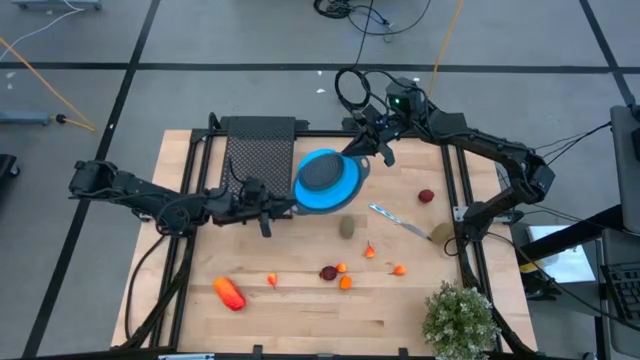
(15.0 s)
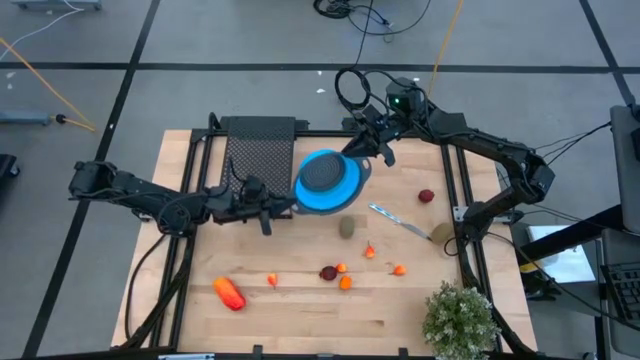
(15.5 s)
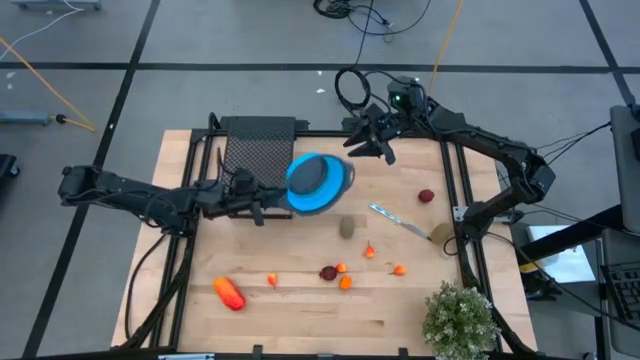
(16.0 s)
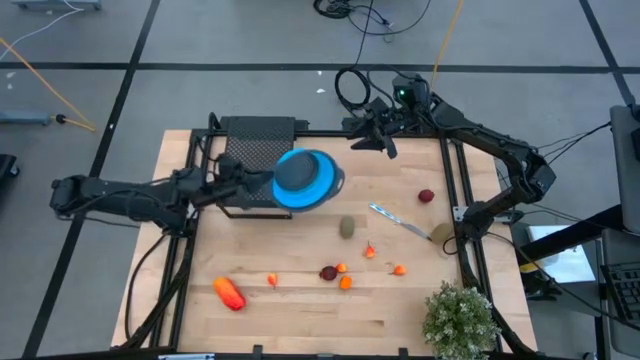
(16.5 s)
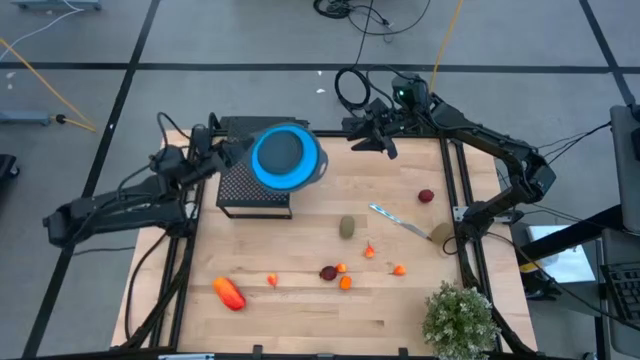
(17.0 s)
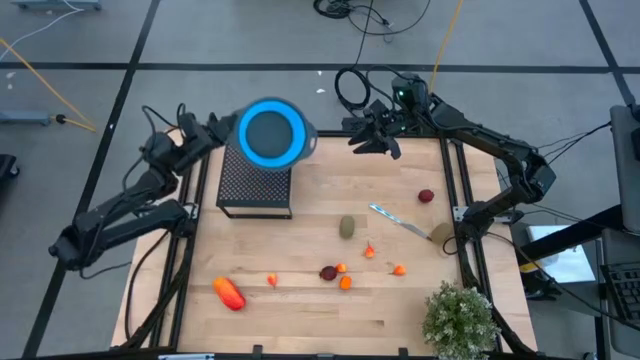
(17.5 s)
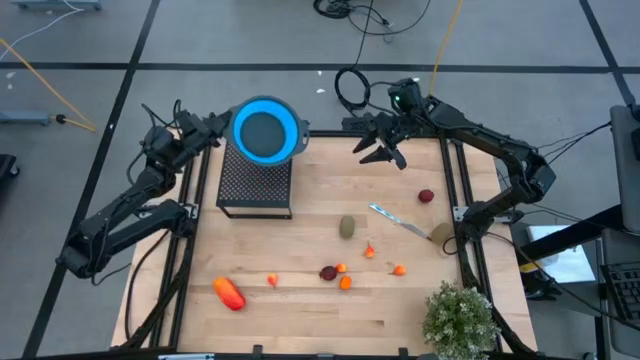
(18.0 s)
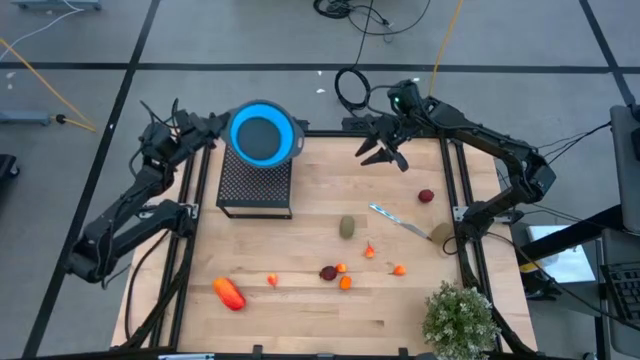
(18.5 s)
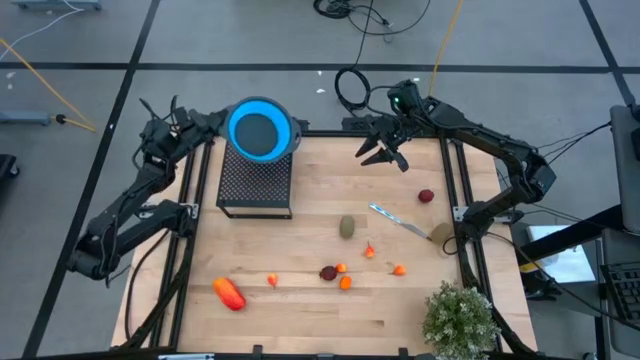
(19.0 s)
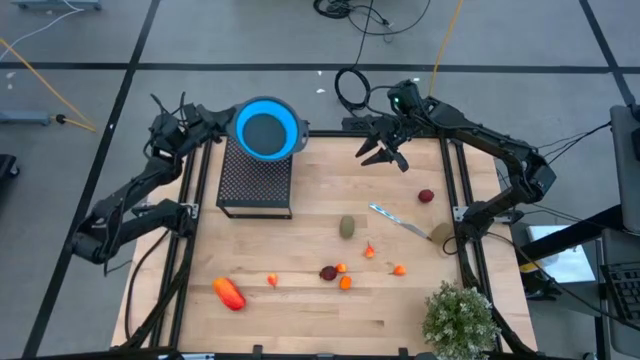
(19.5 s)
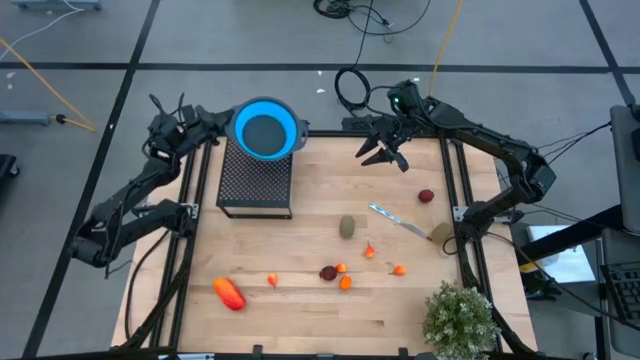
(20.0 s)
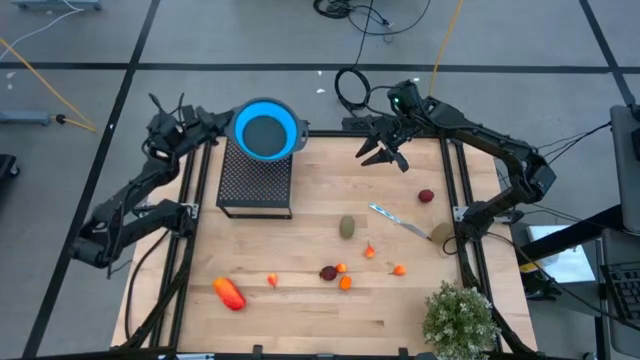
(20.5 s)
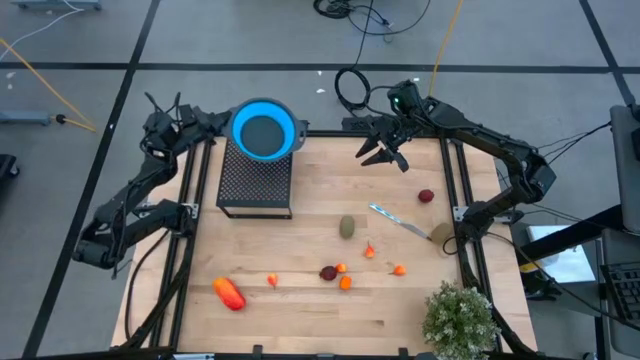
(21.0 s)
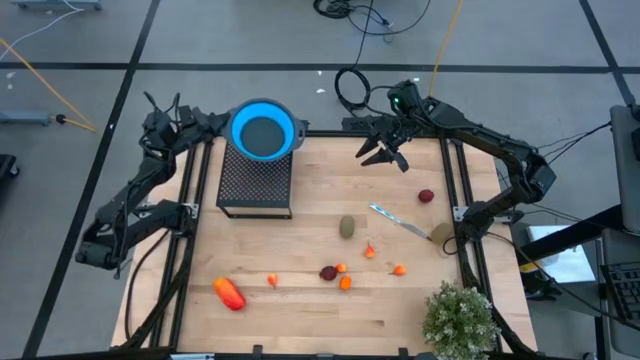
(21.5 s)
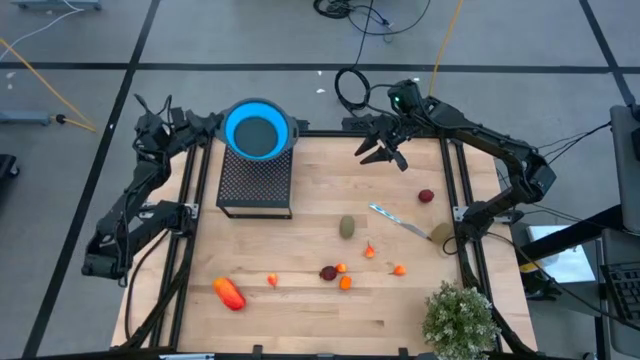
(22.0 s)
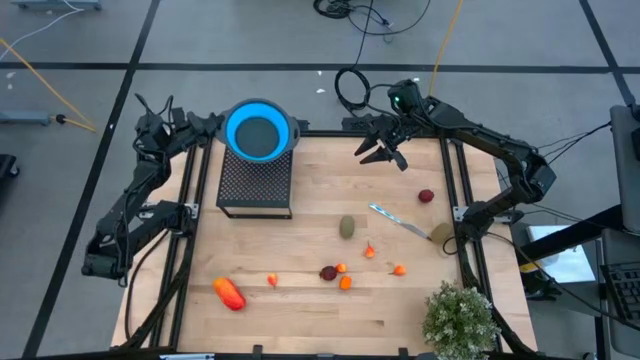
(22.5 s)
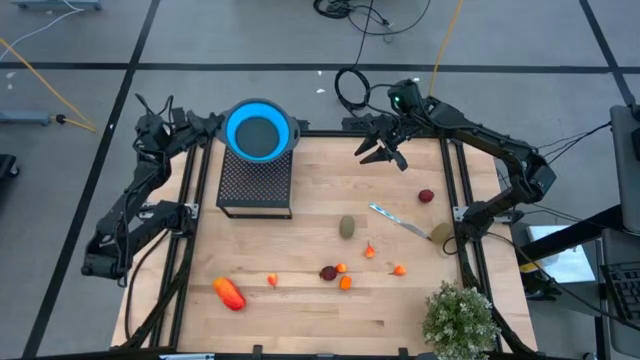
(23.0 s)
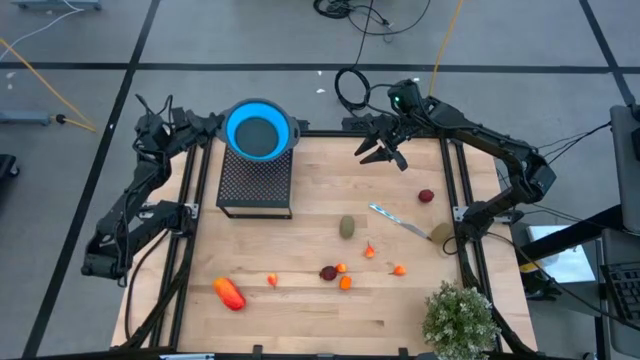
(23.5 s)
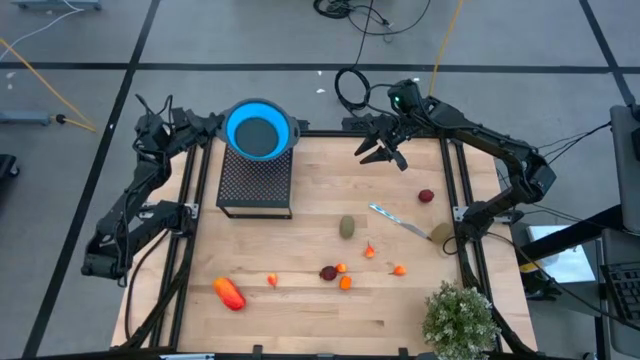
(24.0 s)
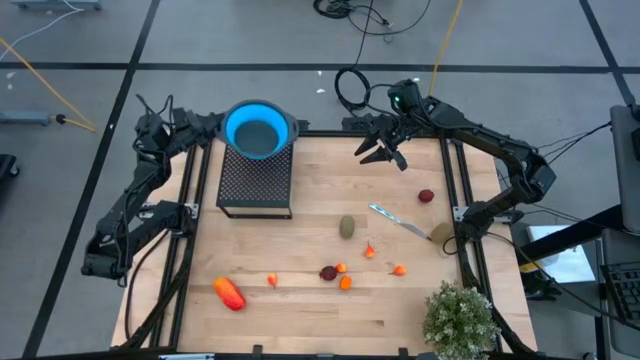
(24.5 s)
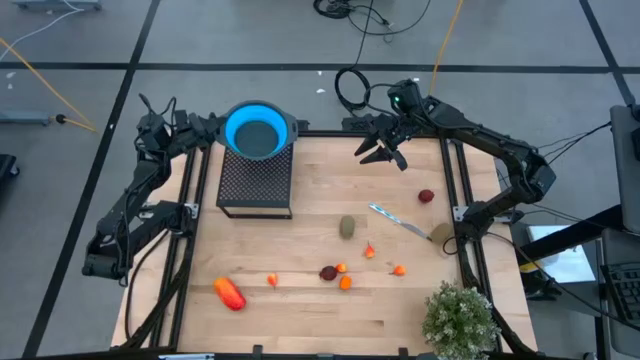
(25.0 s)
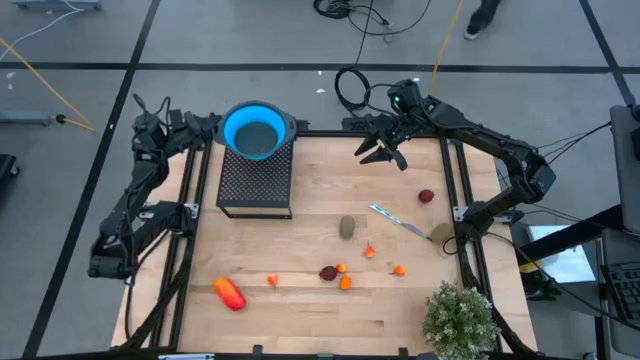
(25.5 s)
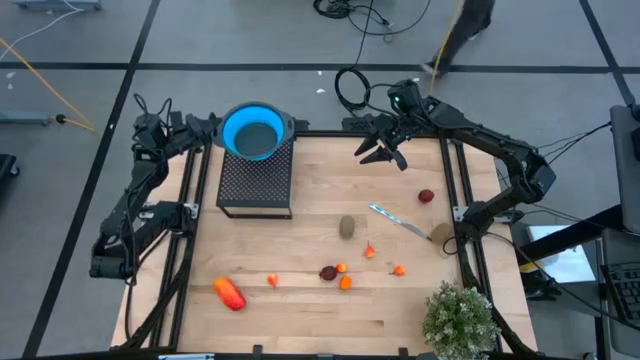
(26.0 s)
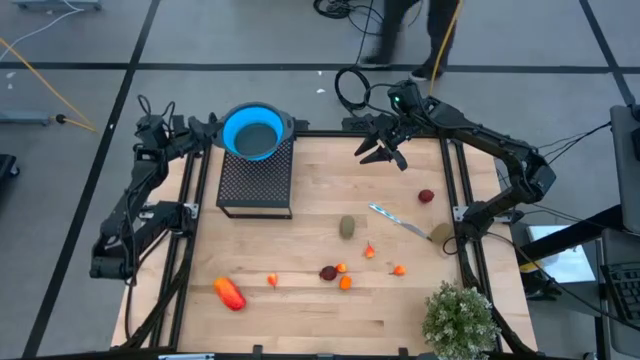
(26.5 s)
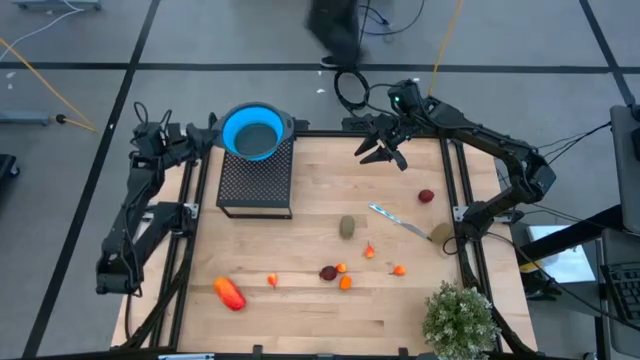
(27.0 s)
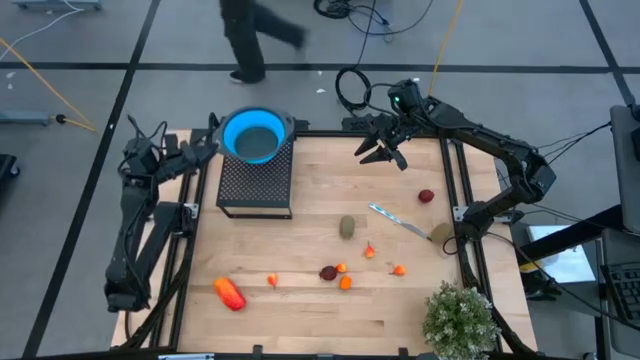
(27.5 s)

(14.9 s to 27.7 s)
Task: Pick & Place Fruit
Put the blue strainer bowl on the shelf

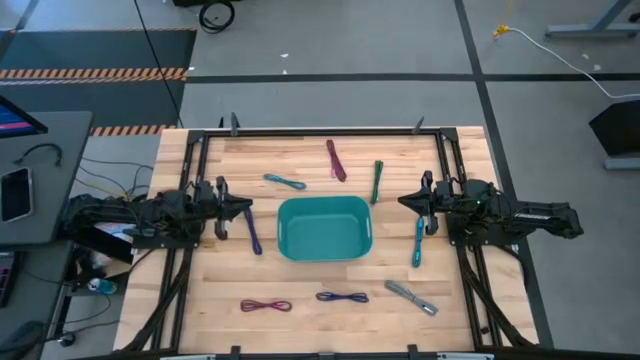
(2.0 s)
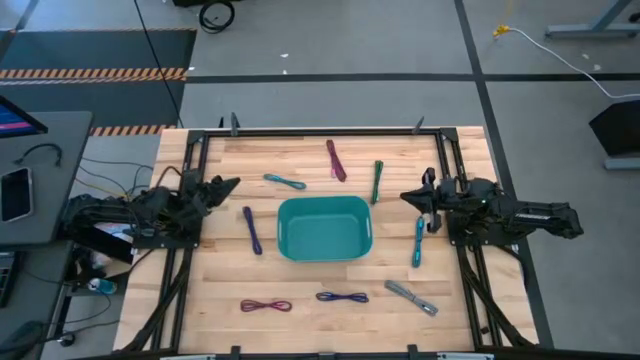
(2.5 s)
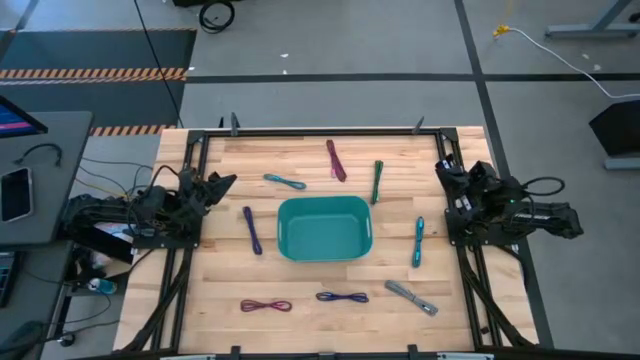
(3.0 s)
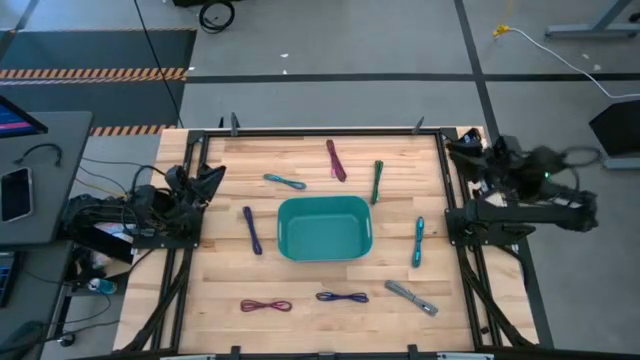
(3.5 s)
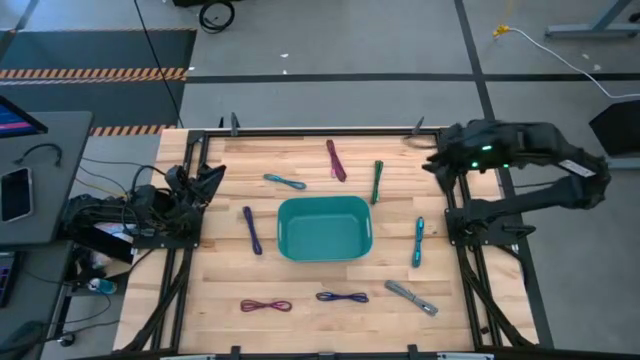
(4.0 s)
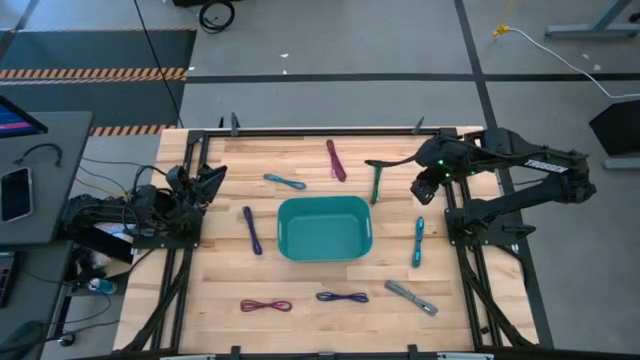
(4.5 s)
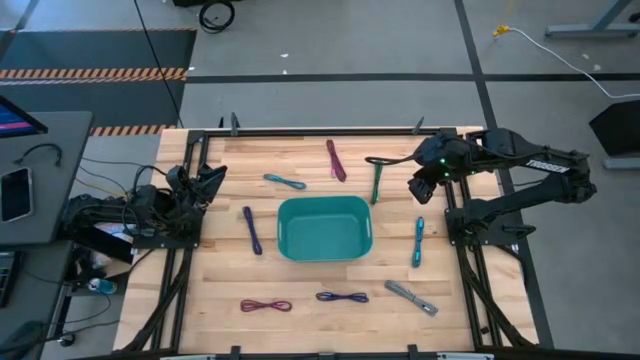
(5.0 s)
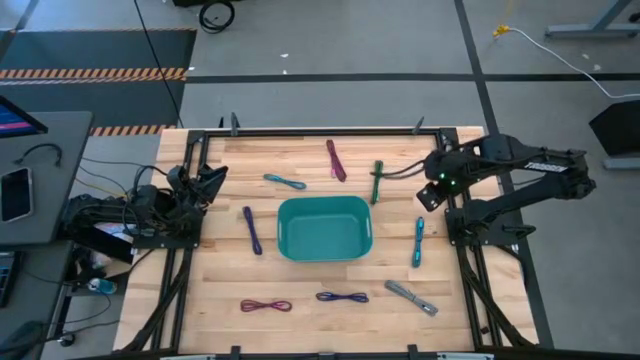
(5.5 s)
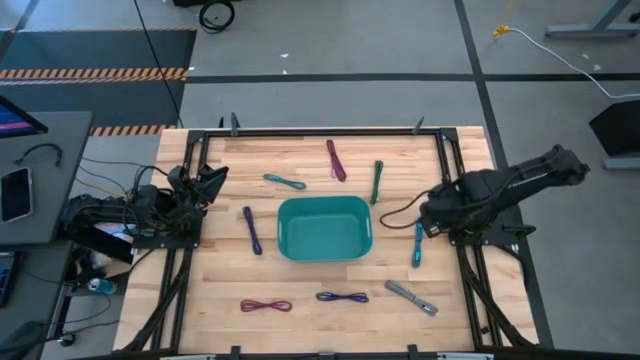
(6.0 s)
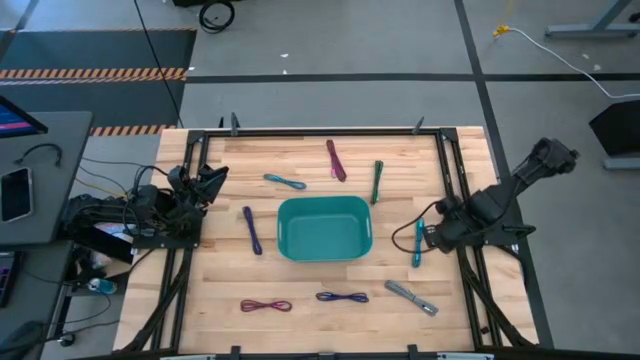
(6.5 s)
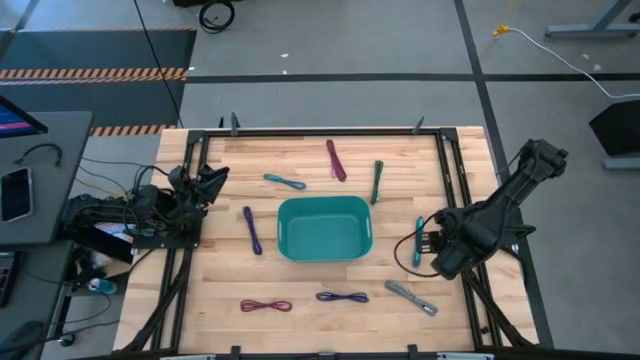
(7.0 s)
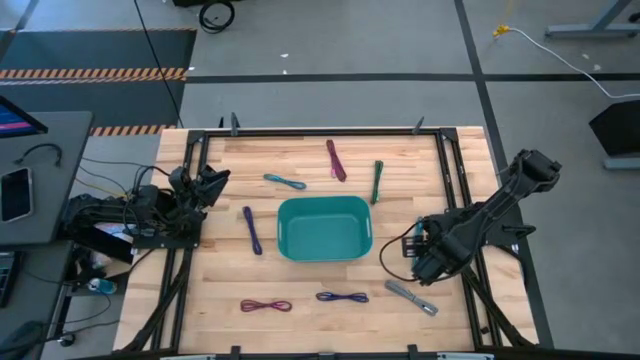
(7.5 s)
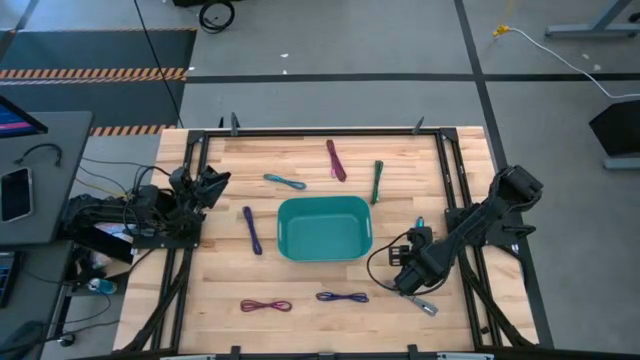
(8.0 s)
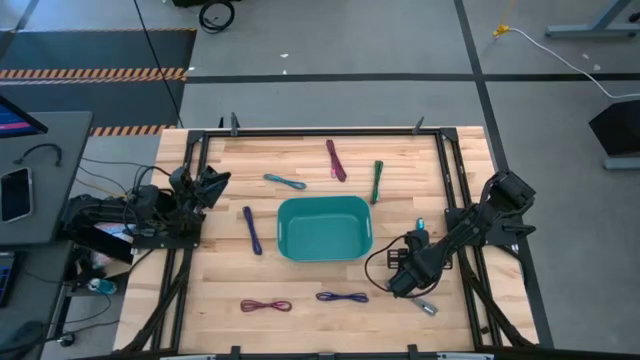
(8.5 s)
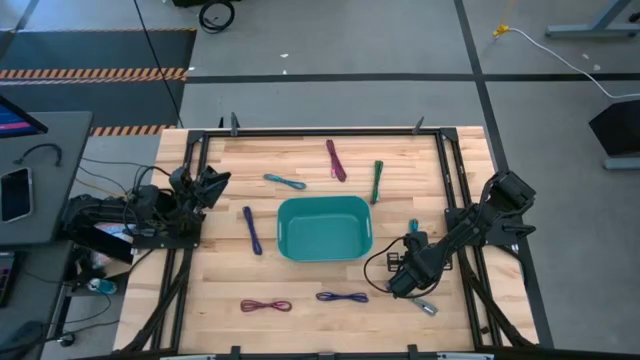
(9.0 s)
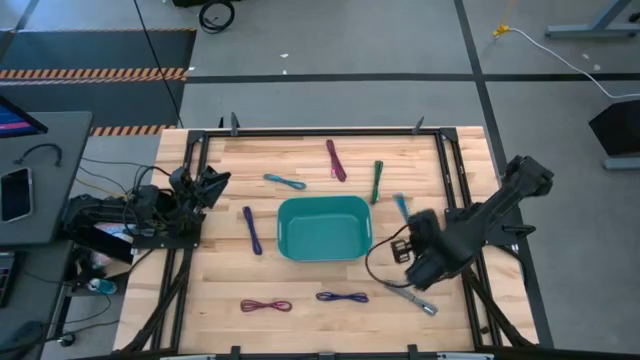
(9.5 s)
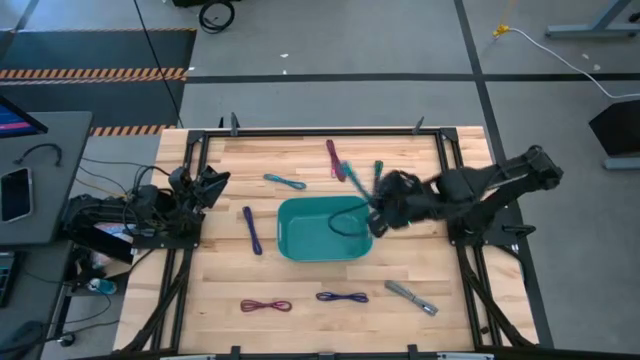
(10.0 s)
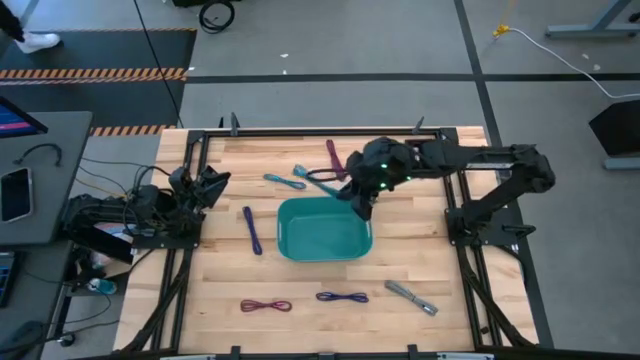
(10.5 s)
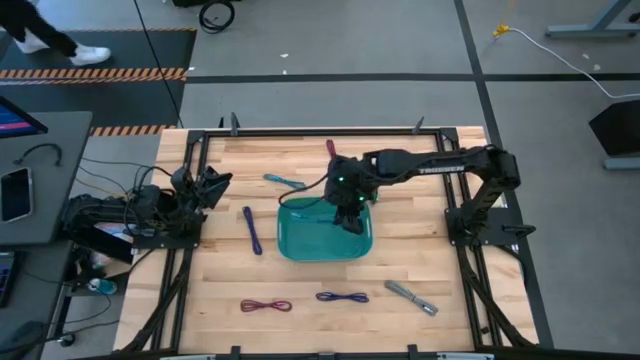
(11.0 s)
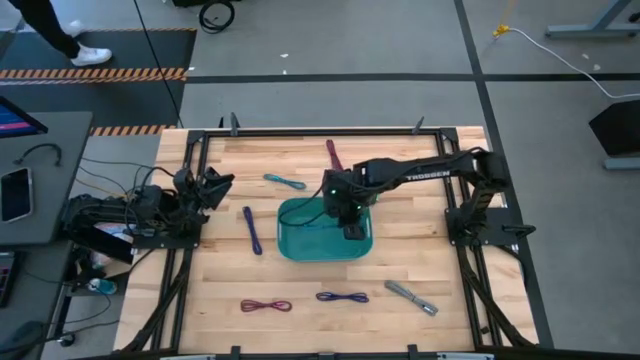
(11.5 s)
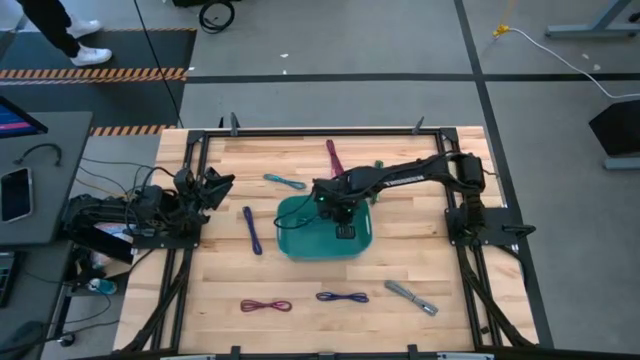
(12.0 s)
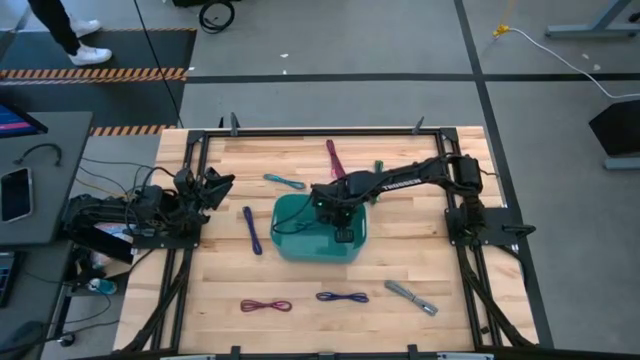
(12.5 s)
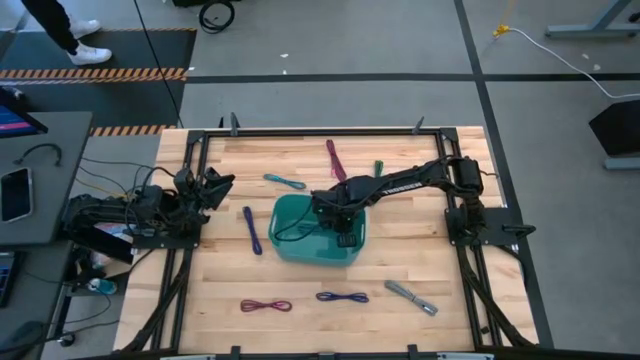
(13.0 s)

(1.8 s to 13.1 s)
Task: Pick and place USB-C Cables
Put the right blue charger cable into the blue bin
